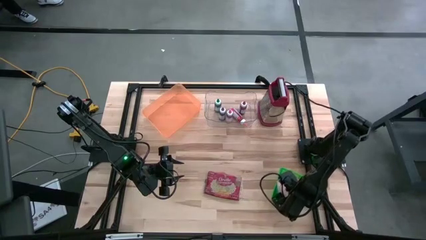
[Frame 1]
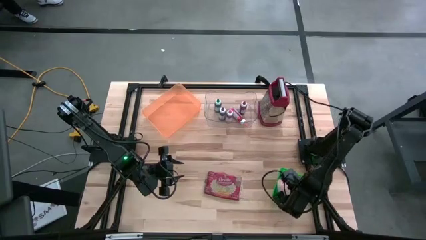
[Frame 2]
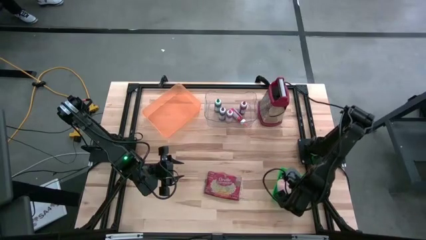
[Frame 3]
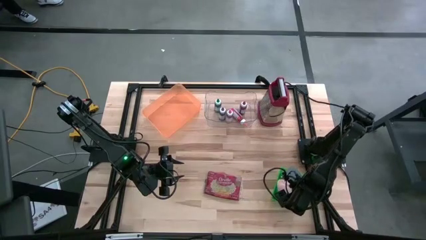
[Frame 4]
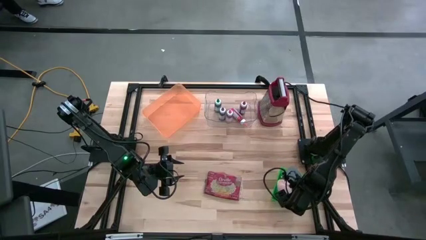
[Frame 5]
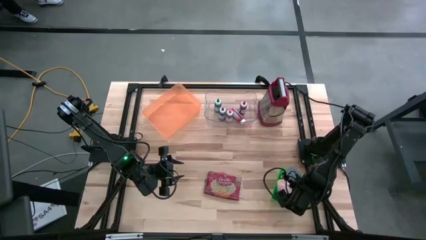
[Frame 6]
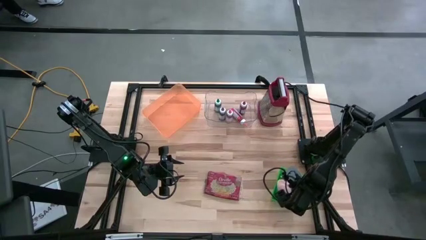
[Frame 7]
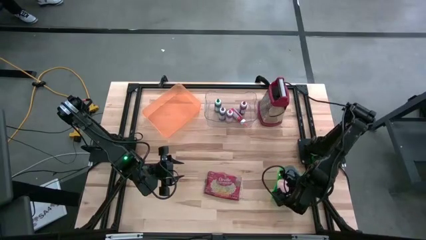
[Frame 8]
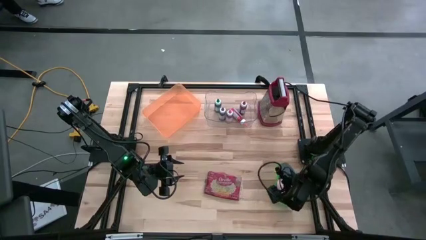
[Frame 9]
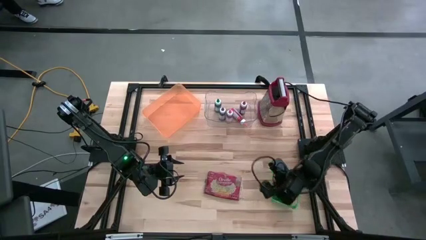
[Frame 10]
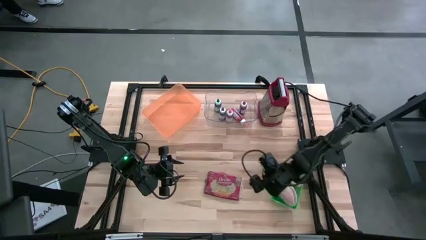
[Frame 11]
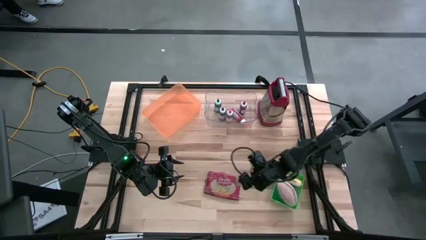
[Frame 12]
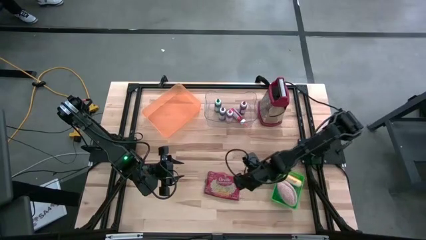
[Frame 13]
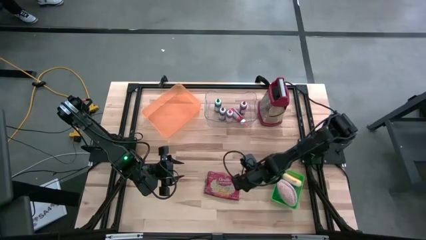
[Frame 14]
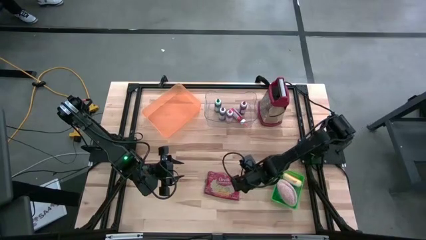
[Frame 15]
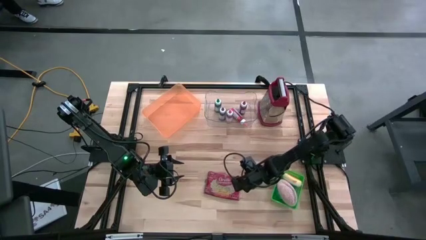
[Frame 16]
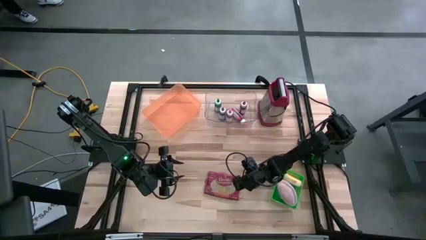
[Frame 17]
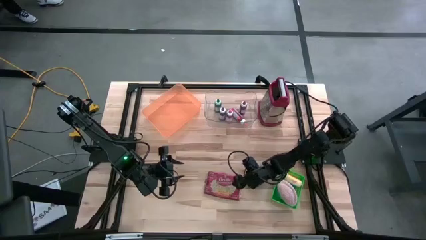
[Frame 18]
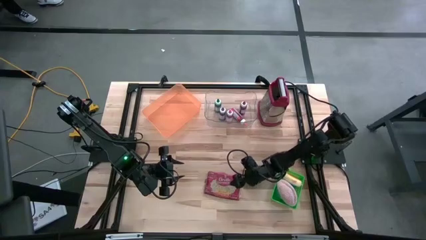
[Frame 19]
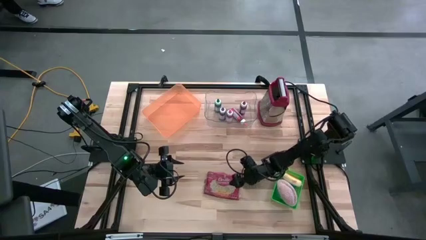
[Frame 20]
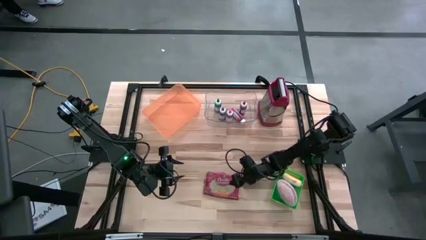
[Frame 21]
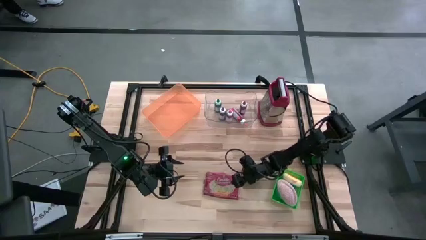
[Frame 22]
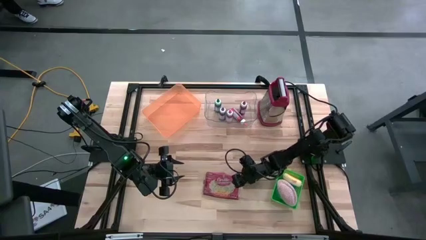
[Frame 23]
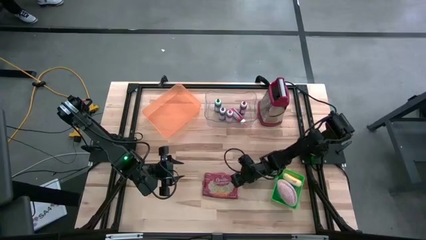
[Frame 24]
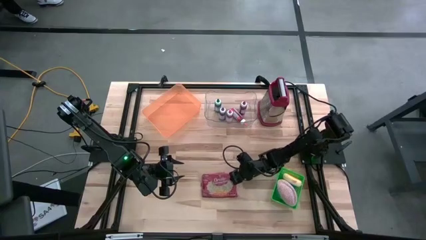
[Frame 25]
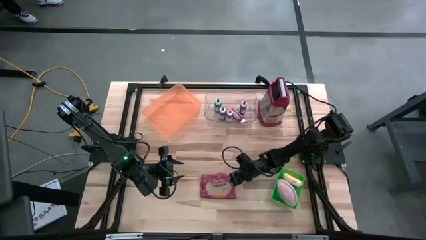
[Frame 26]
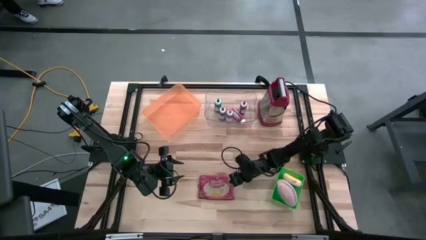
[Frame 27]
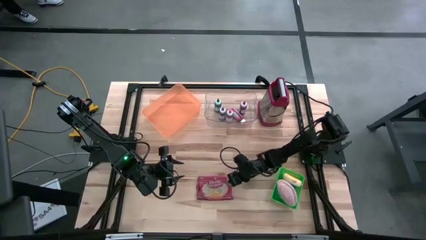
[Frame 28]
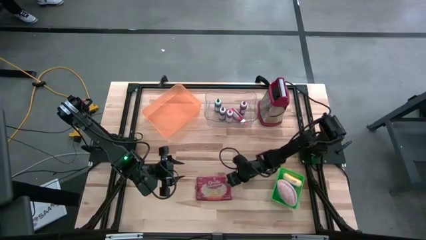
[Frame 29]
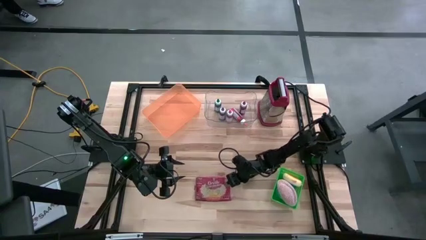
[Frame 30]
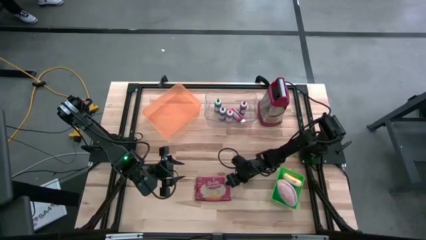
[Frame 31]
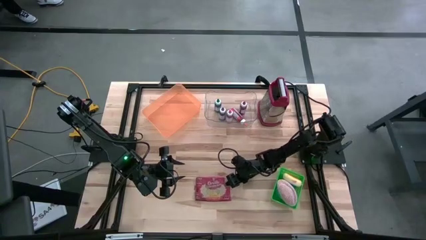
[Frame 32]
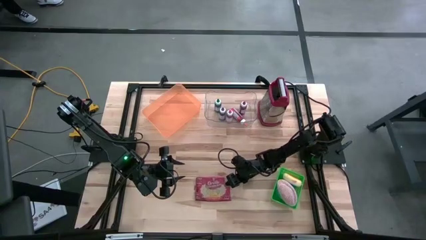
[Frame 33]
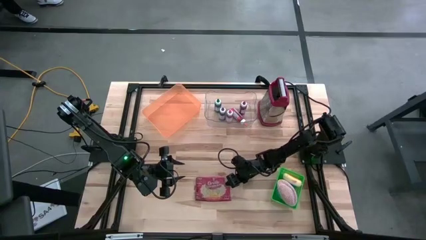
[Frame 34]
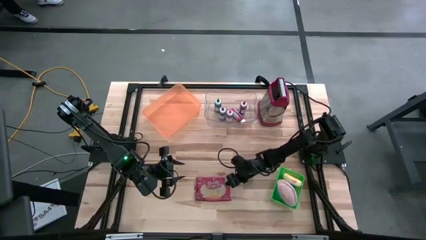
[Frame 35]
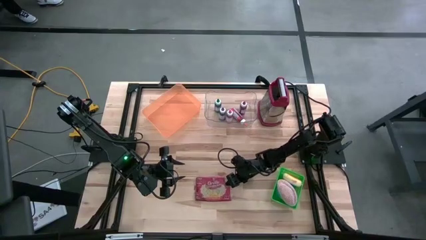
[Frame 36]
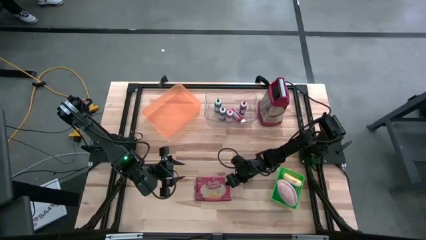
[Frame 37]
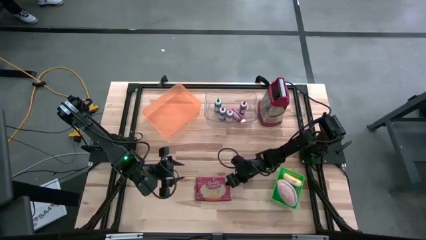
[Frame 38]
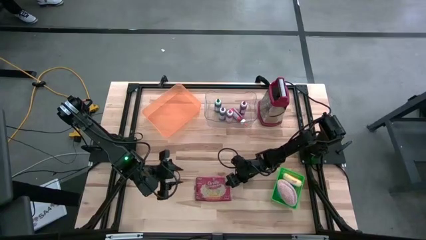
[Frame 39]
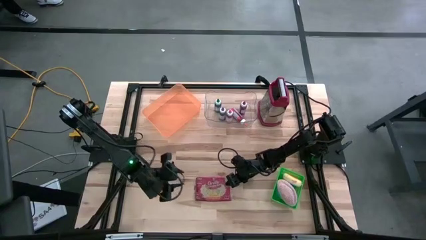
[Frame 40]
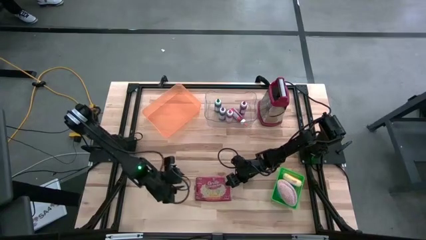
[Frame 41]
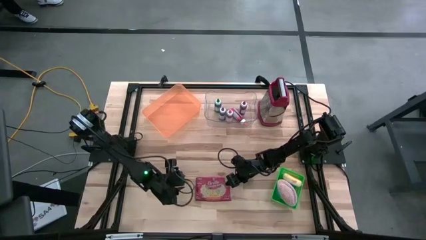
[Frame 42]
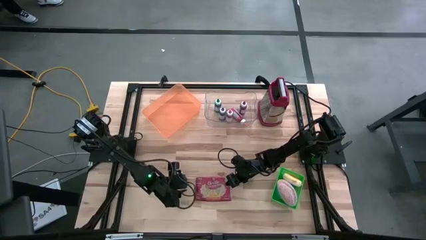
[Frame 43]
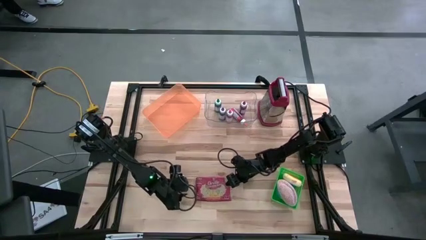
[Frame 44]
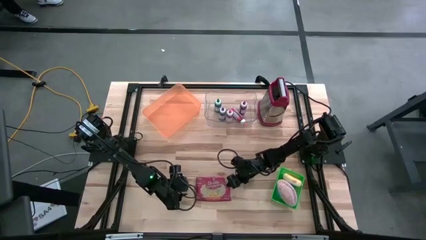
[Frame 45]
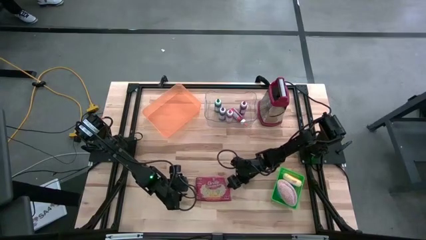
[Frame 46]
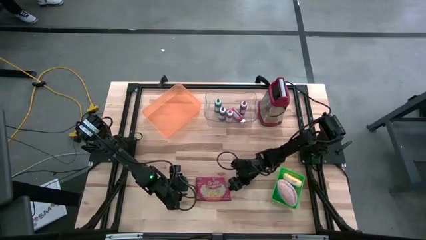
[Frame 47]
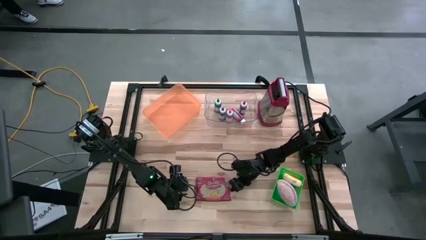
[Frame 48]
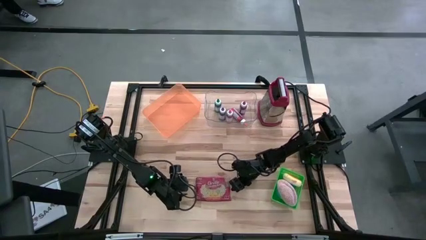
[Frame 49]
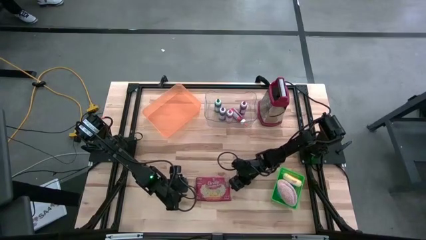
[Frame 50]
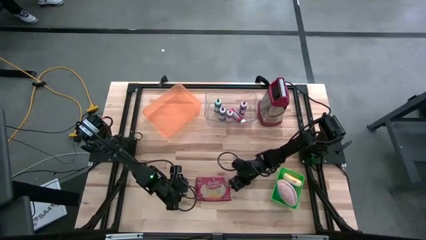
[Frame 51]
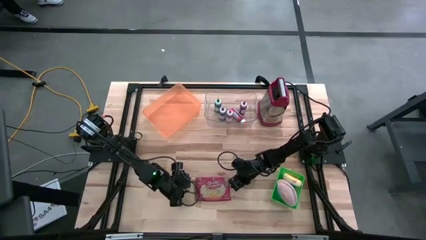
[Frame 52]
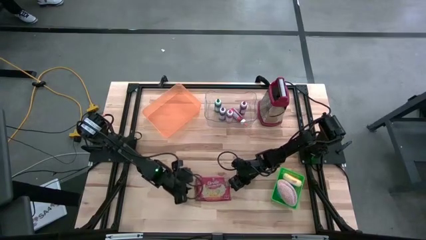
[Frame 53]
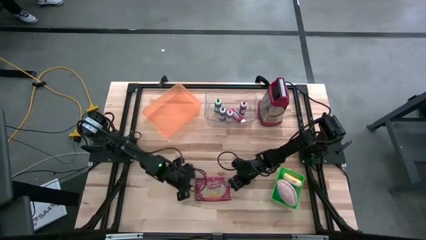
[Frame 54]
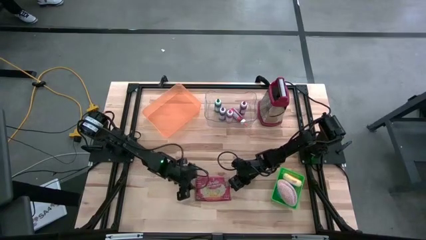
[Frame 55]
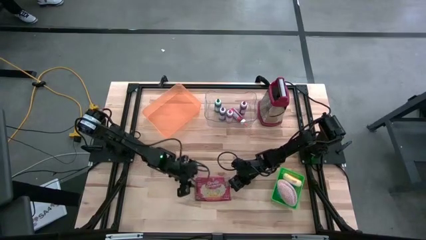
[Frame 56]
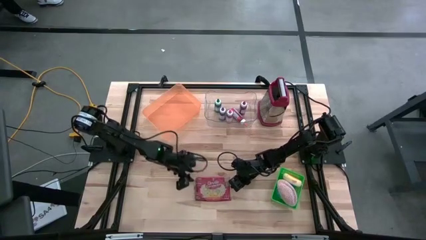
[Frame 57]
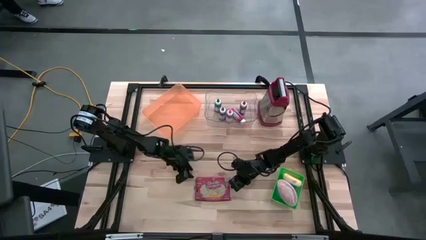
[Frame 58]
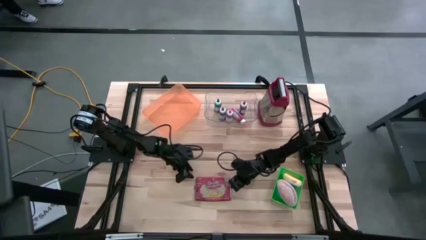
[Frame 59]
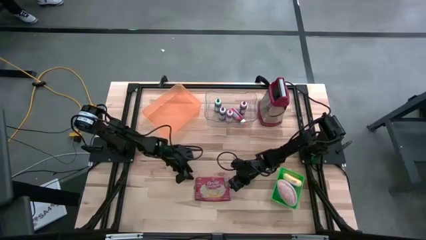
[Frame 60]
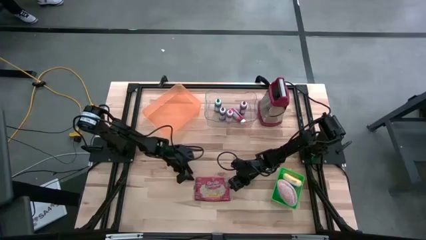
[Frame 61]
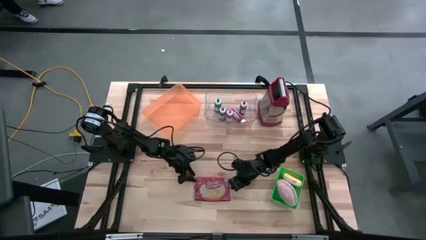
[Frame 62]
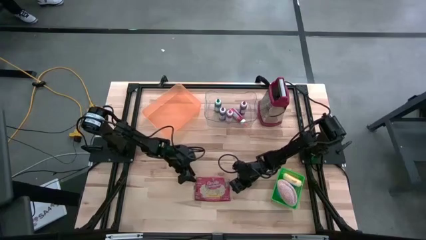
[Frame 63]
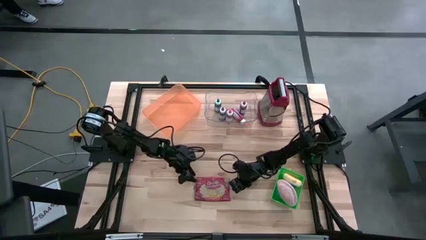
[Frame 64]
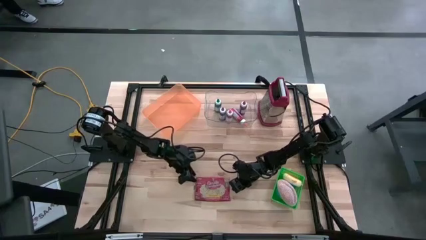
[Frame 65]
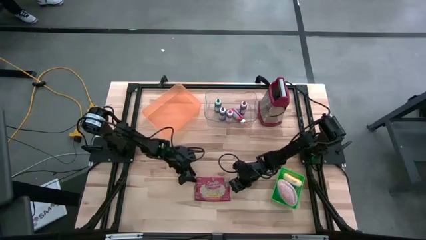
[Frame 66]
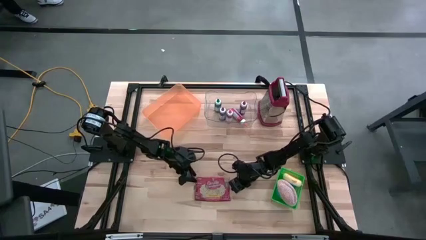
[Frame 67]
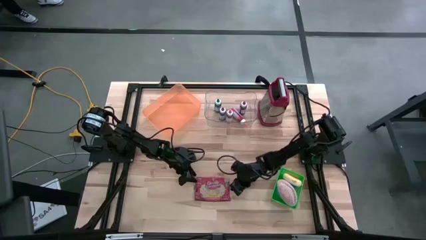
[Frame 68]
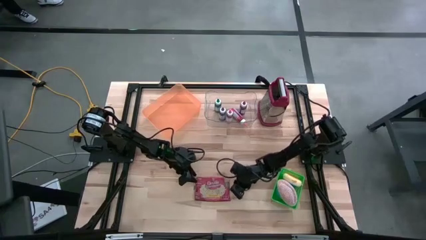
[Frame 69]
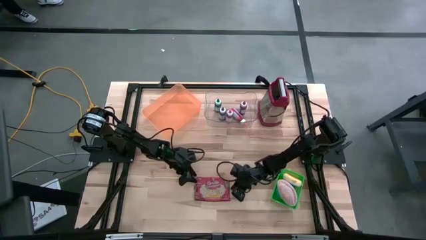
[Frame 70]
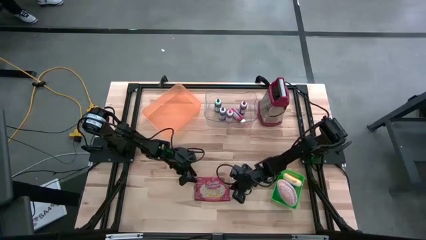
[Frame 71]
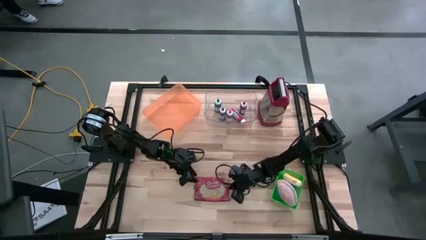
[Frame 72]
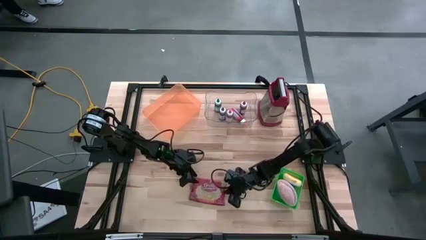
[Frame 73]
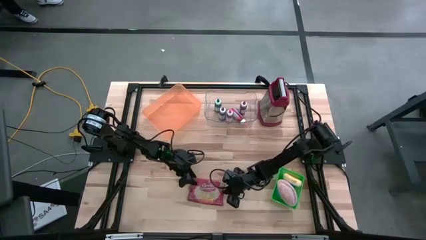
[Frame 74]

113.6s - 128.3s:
Put the red popcorn bag into the orange bin
